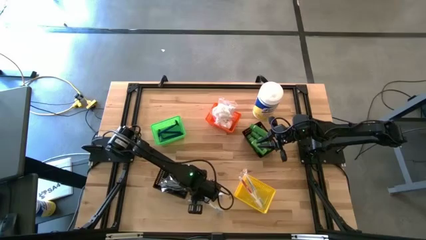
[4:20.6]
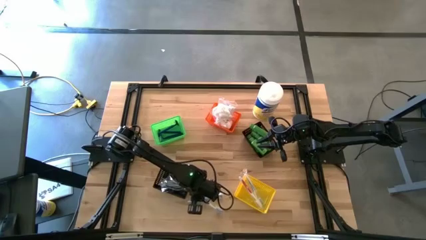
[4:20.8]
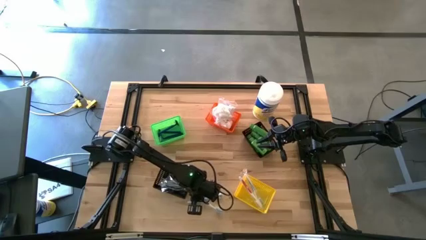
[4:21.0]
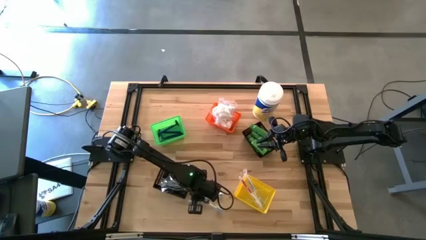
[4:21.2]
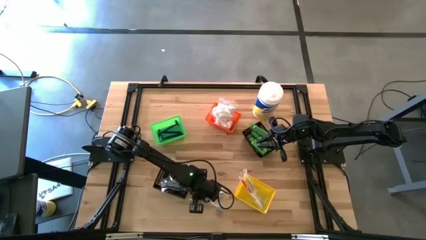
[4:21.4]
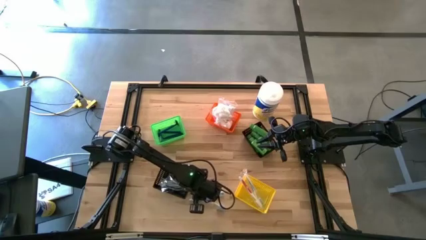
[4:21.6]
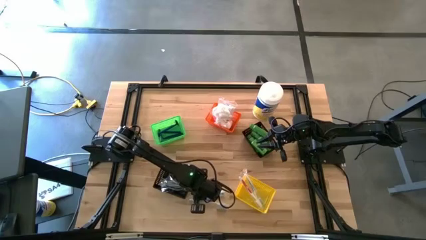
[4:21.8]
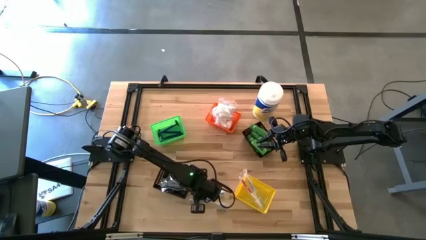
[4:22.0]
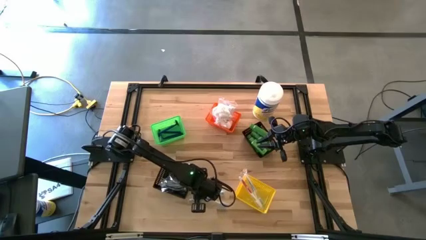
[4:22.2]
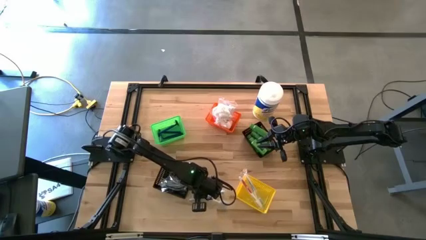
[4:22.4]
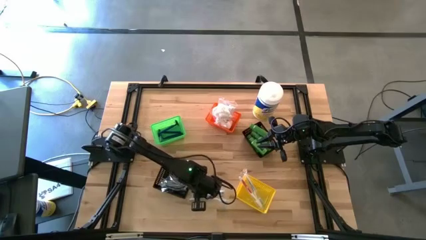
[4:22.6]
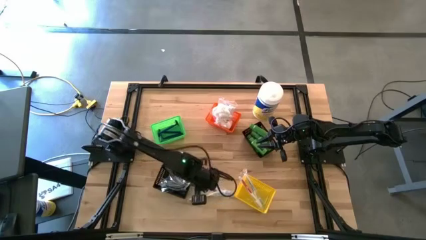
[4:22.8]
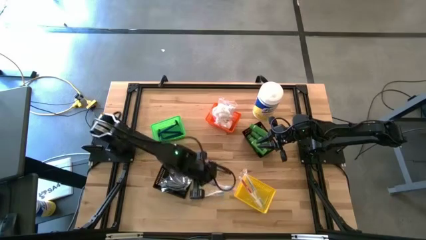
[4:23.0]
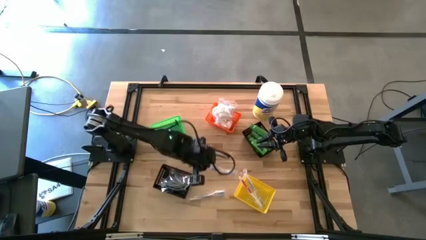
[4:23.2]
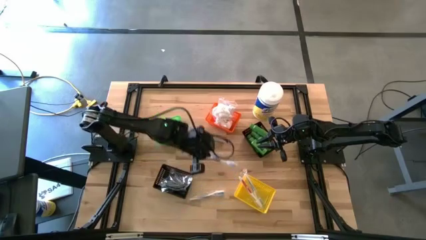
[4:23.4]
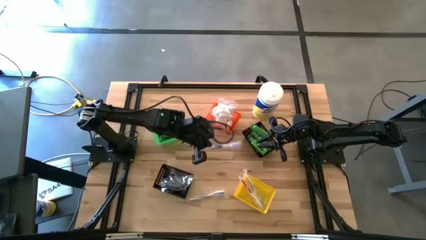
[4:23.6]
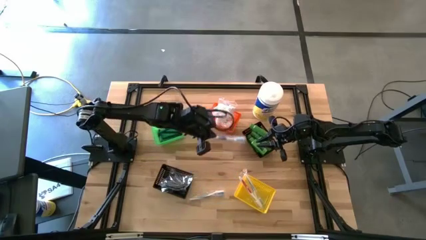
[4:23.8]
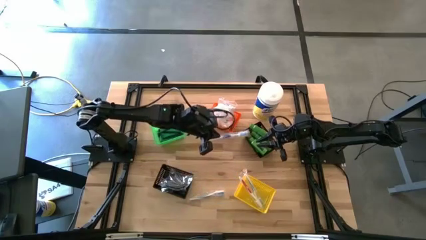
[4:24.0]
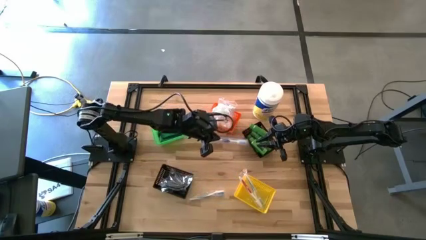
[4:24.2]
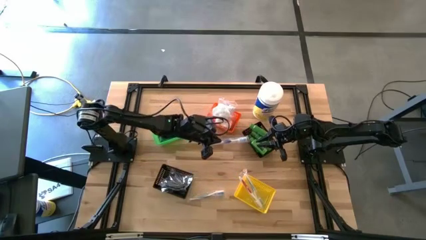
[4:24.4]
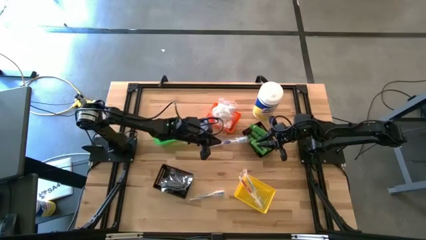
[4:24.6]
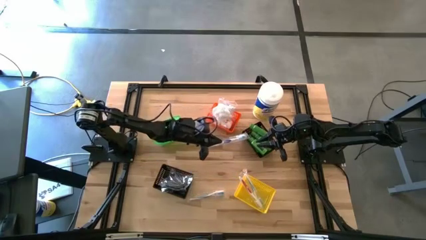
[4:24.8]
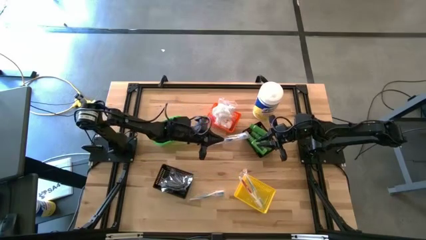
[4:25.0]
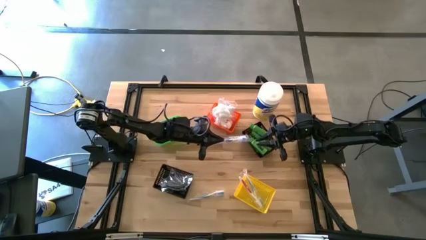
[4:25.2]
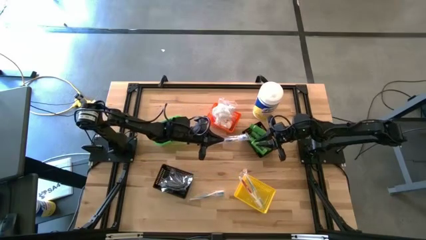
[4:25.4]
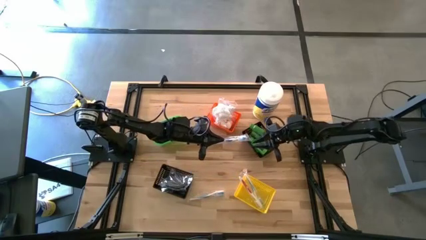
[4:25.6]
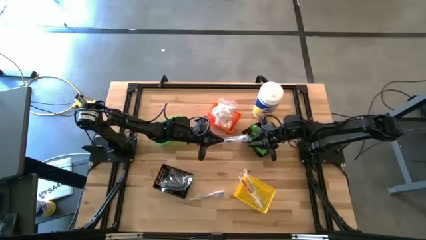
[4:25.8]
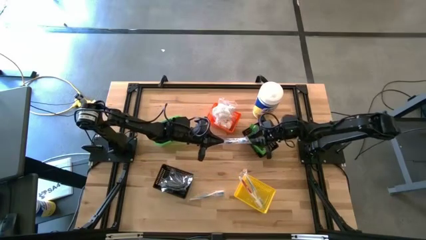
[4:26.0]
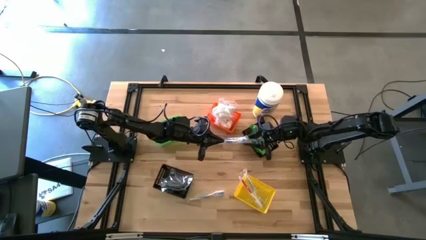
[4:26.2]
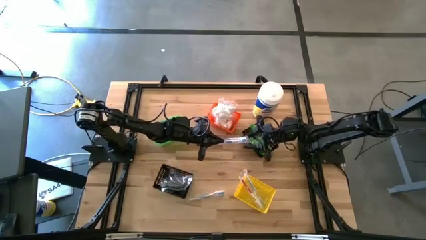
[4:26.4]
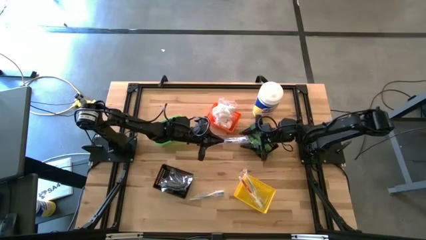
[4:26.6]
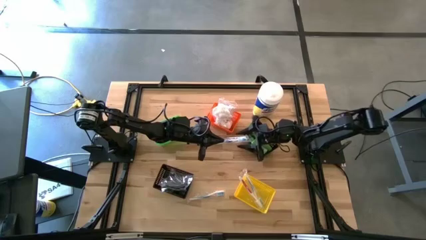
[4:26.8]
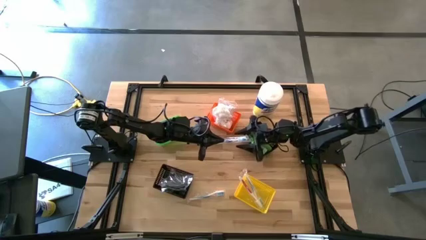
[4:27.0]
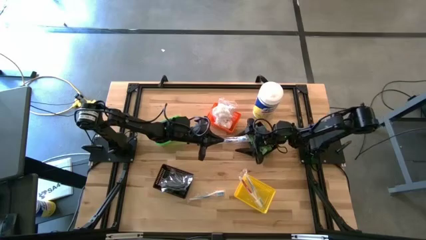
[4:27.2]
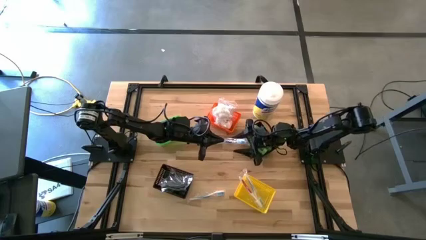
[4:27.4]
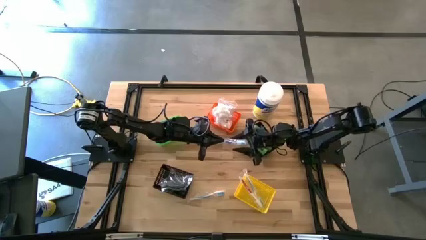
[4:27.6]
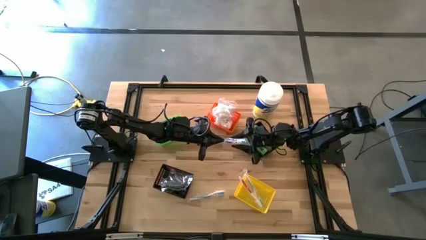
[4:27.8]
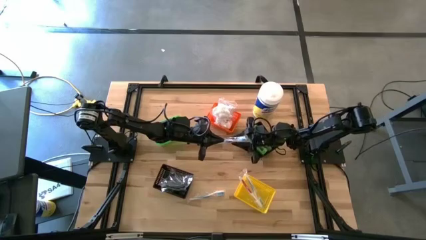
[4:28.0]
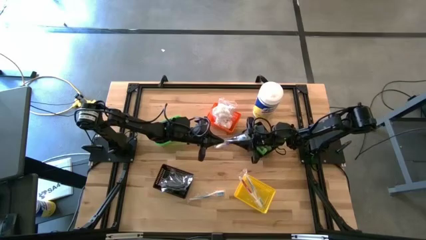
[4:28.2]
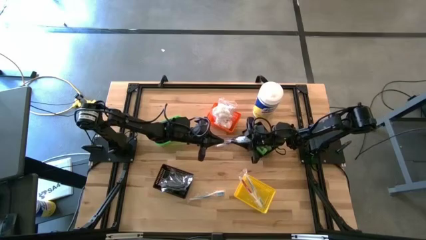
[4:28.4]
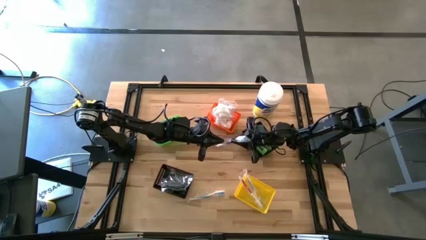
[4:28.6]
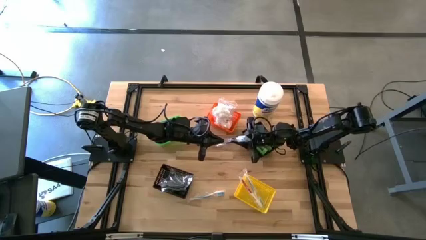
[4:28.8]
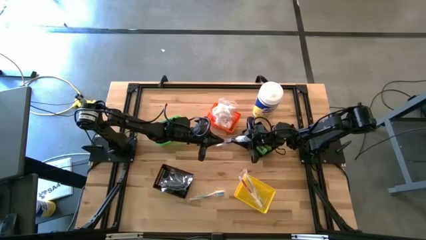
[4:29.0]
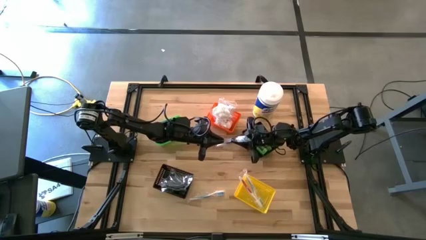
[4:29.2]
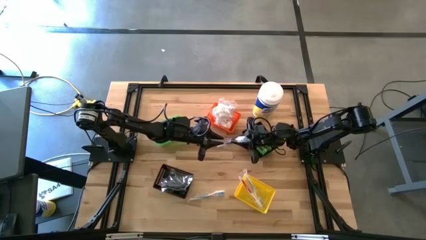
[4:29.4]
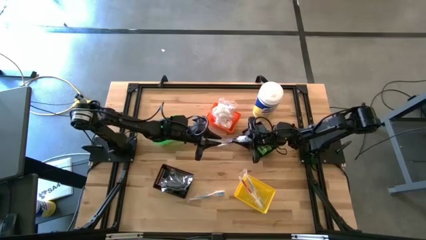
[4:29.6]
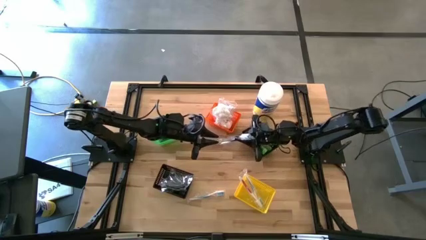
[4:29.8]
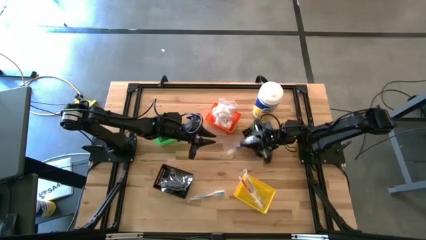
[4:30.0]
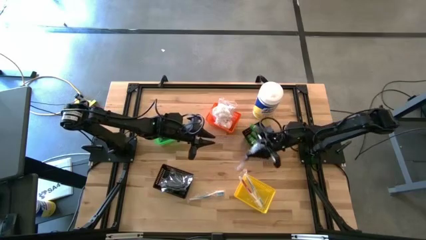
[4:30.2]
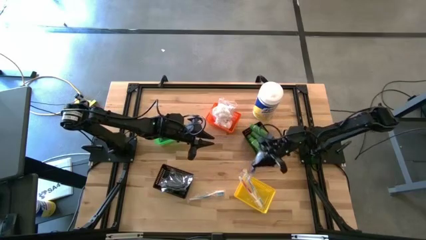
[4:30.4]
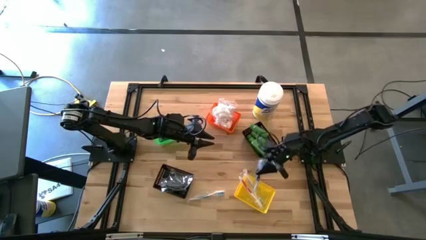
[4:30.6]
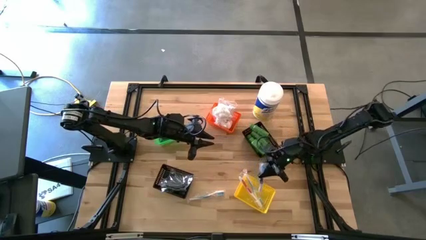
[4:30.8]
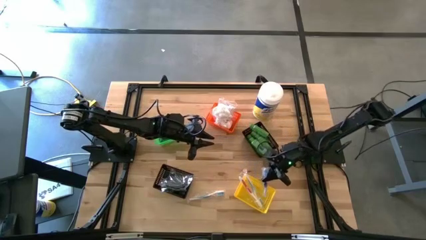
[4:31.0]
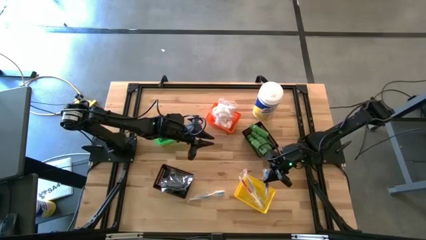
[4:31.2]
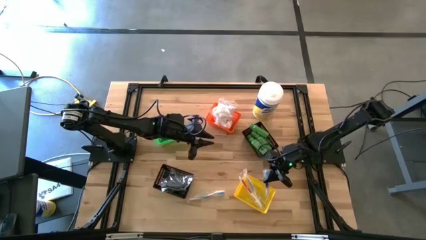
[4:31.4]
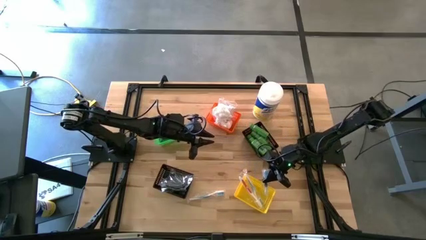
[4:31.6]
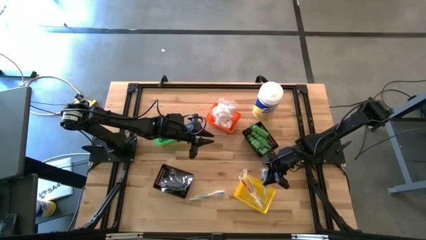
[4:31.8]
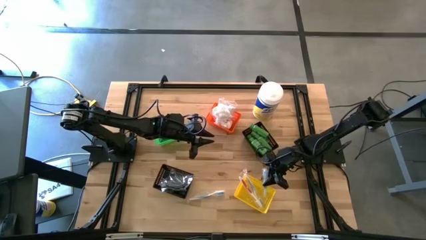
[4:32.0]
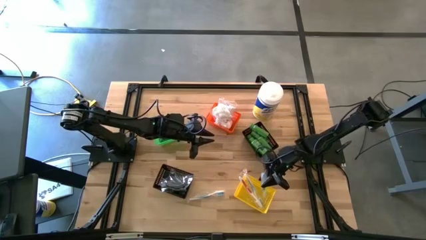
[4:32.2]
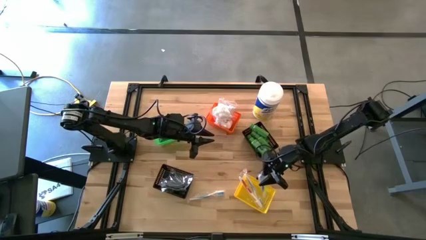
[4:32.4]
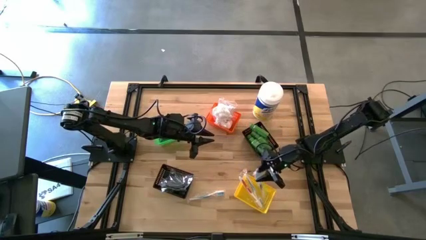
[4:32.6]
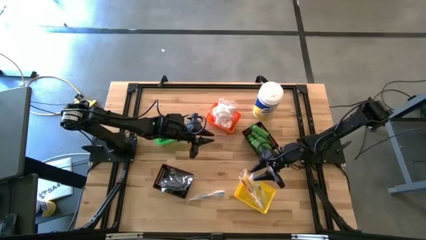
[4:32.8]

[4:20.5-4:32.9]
Task: Pick & Place Travel size toiletries
Put the dark blue toothbrush into the yellow bin
